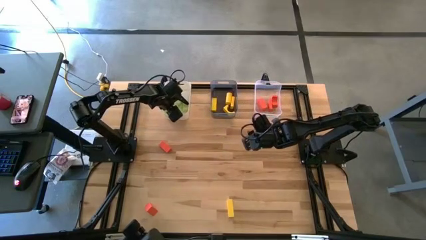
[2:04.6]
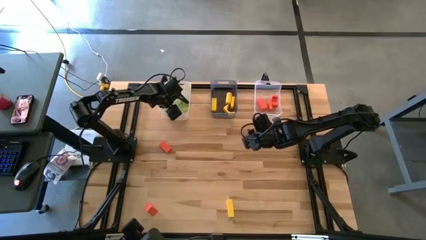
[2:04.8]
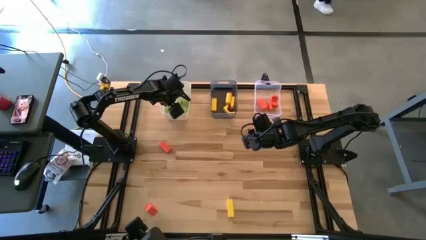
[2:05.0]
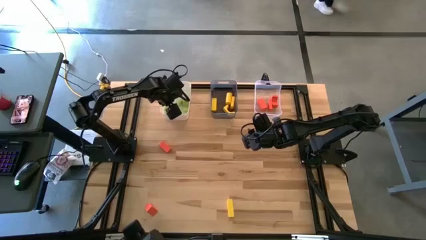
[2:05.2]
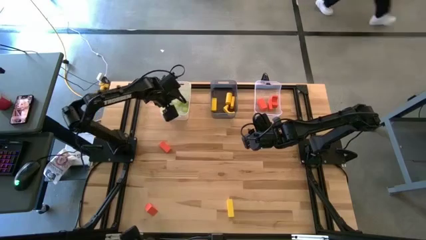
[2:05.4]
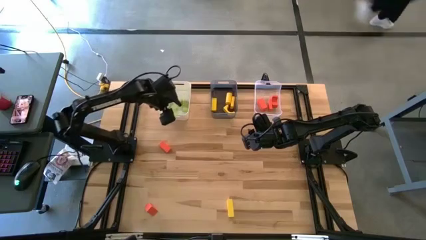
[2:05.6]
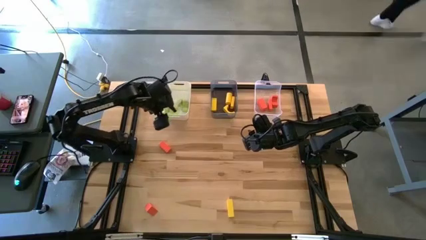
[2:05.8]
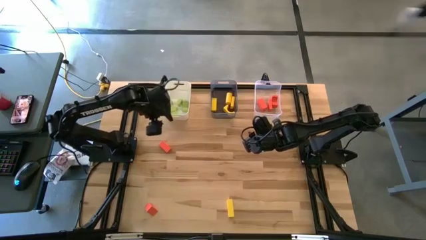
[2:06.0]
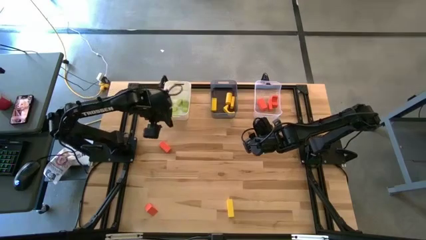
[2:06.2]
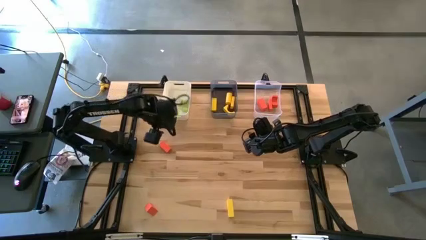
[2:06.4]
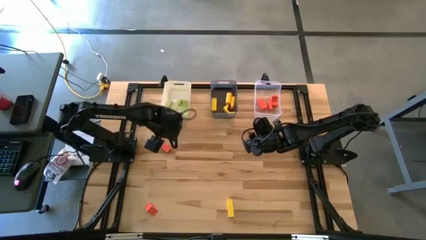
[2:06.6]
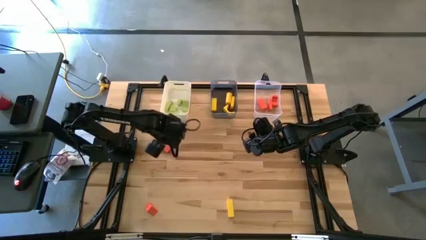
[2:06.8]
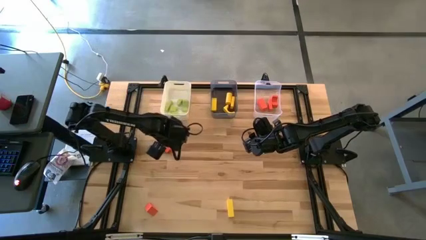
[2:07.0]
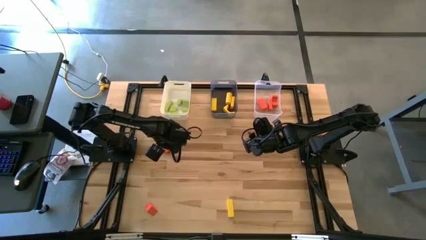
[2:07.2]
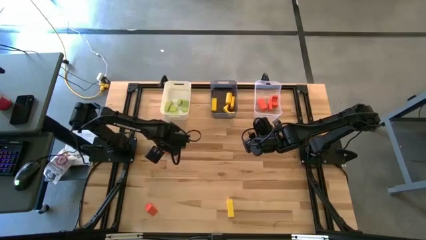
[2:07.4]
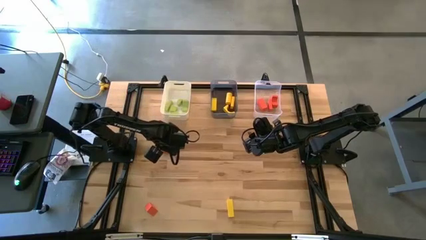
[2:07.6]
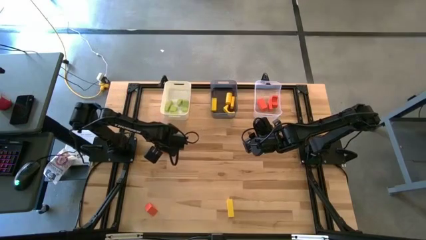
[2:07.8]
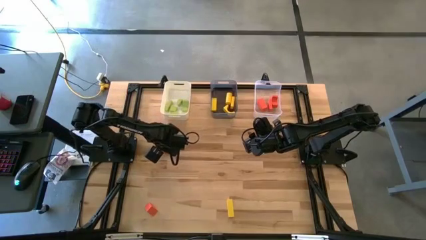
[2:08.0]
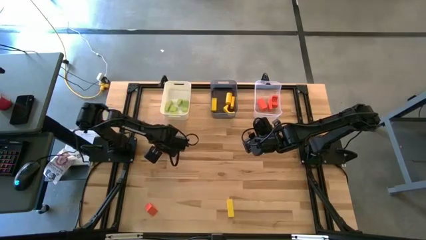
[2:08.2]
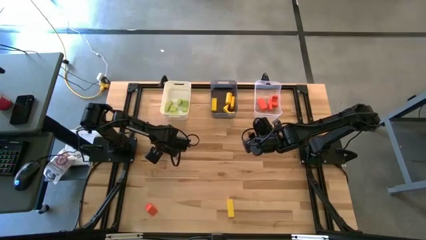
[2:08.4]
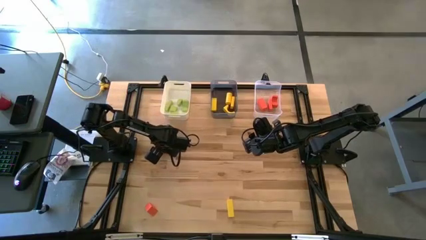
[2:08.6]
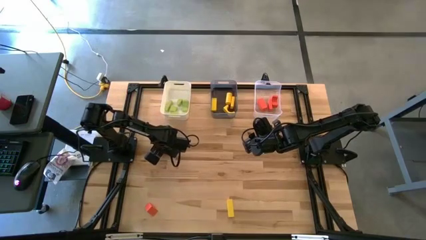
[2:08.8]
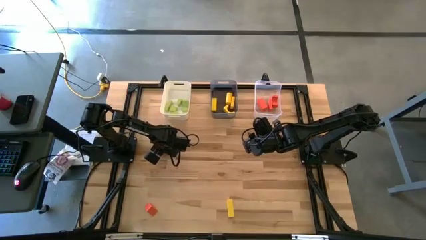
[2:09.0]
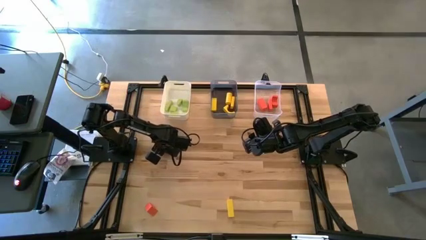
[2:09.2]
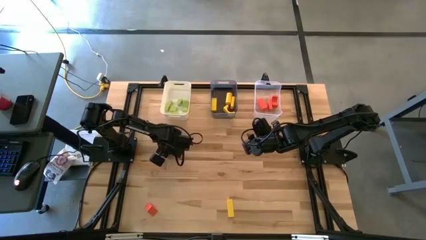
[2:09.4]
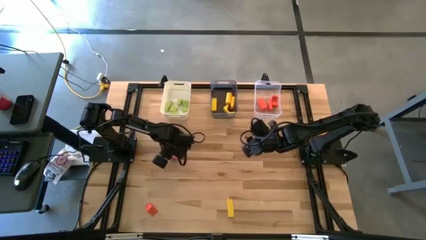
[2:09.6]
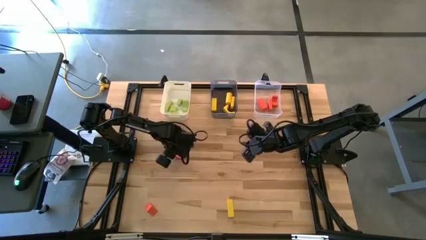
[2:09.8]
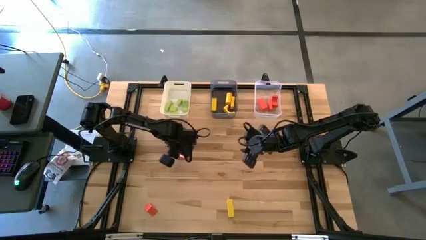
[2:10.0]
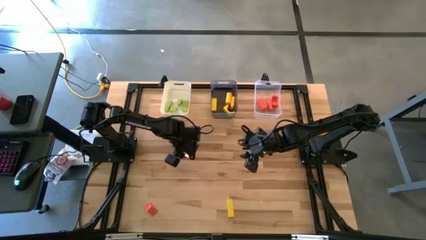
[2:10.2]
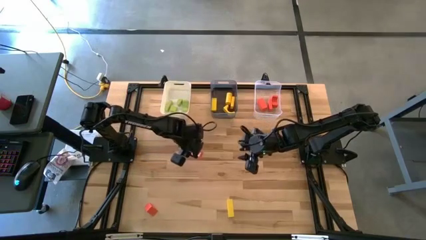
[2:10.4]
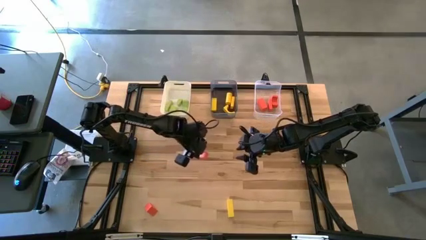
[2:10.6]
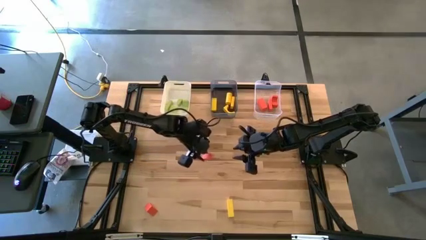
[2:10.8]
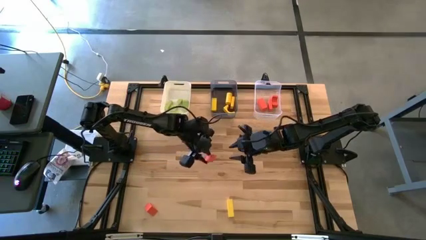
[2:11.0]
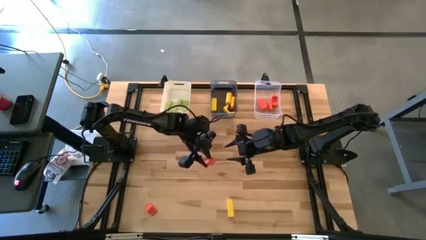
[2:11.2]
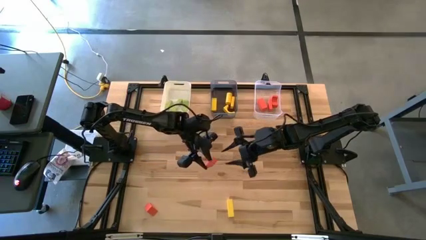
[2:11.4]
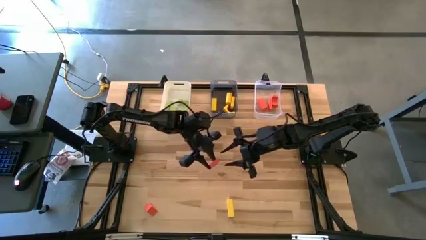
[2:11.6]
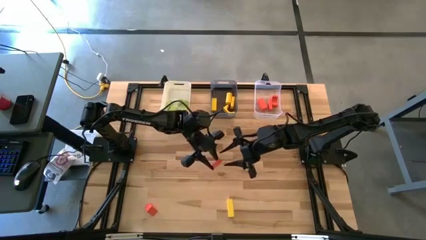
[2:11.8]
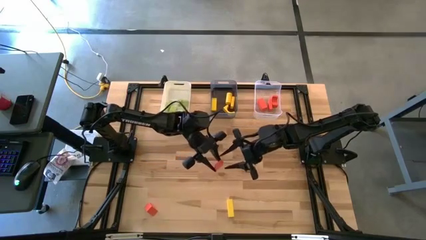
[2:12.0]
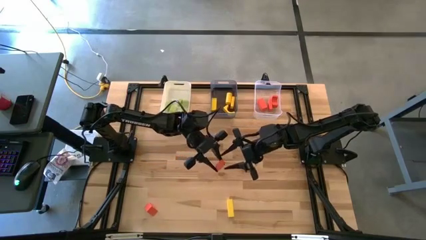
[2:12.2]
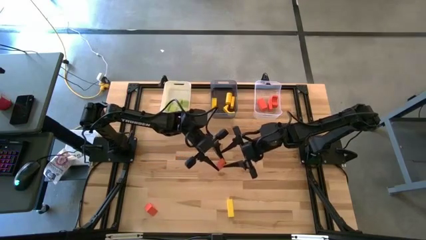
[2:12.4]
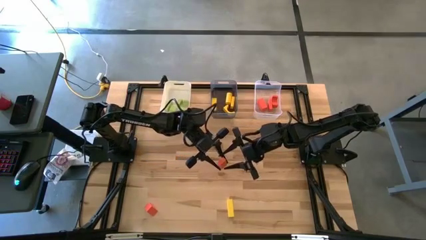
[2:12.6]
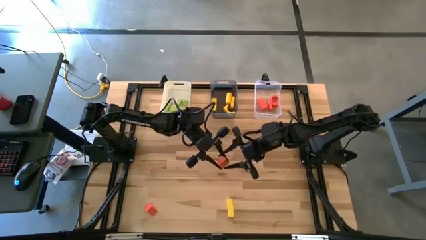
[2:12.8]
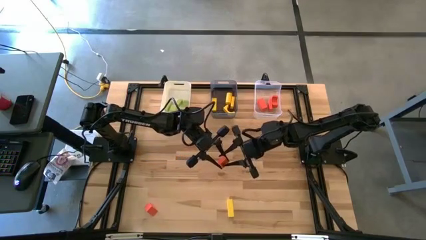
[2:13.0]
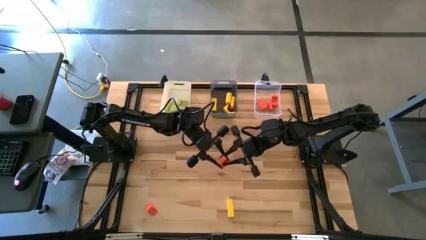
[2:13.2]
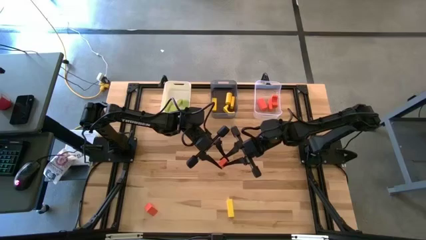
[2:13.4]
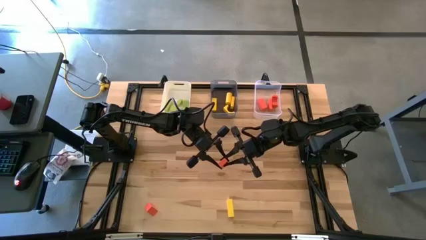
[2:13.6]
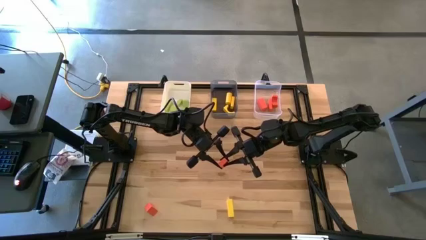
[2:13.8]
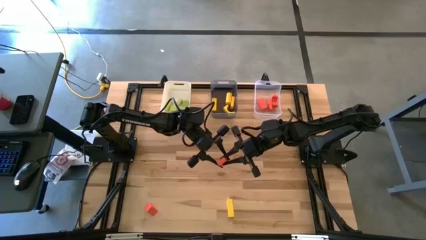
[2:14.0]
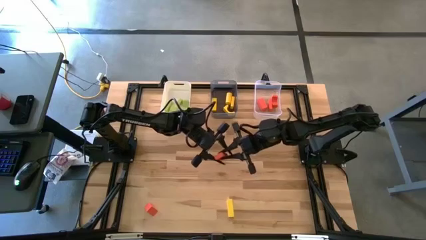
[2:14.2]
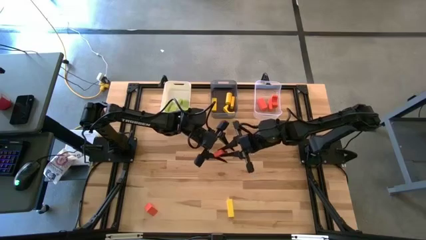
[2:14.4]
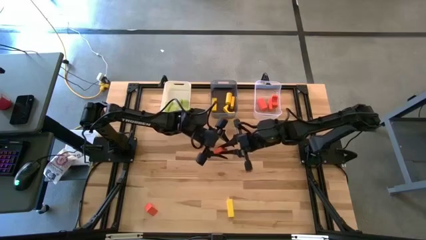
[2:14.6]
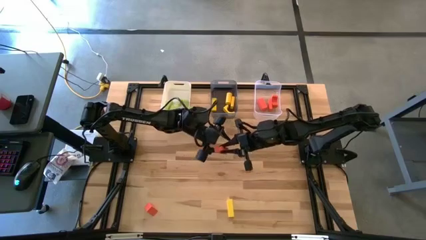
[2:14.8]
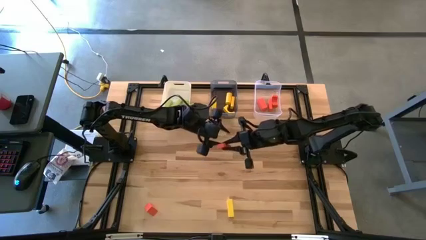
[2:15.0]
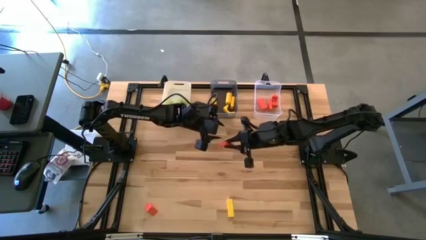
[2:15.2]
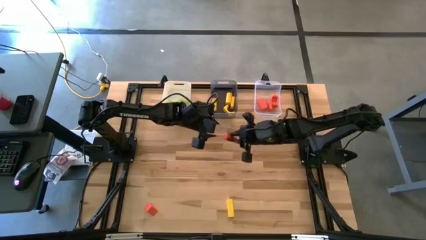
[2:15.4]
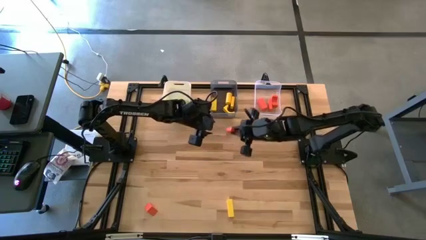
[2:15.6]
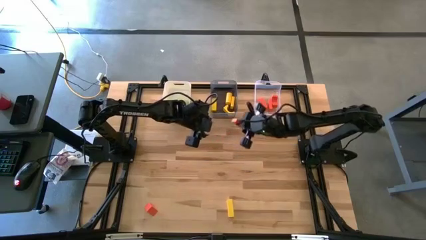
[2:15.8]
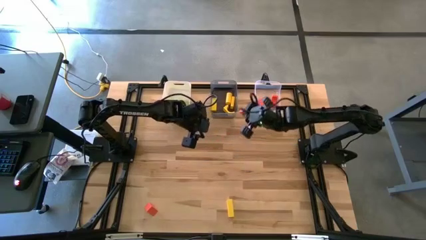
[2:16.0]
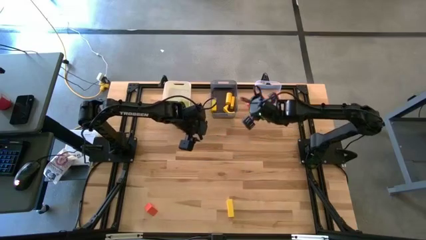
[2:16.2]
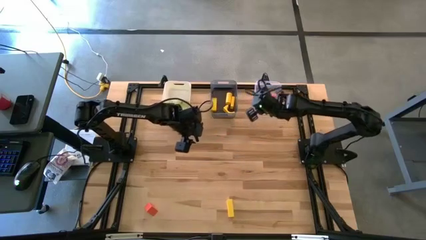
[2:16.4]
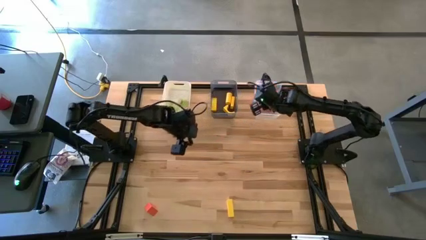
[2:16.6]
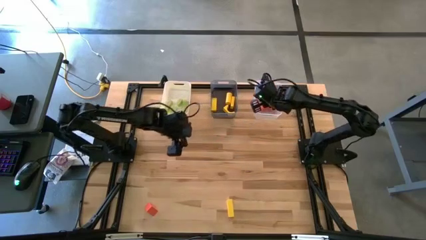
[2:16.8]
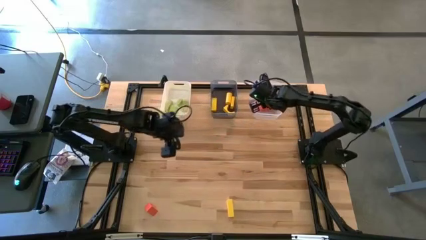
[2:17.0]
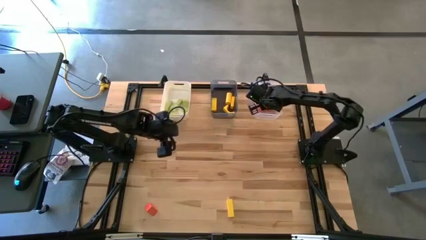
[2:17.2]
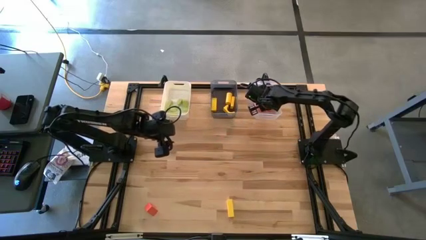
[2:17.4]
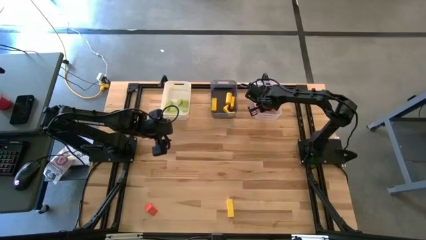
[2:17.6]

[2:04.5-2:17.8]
Task: Sort & place blocks by color
Put the orange block into the transparent bin

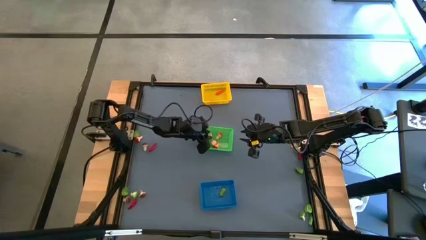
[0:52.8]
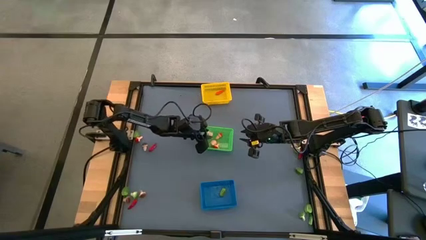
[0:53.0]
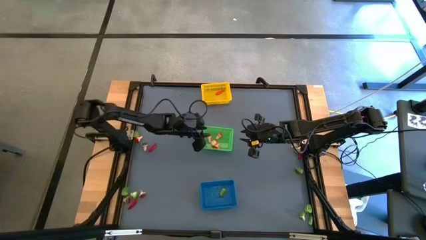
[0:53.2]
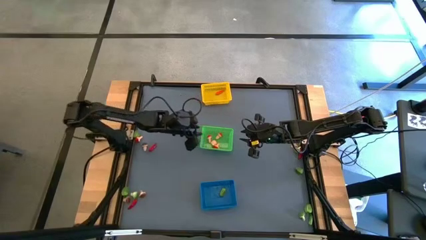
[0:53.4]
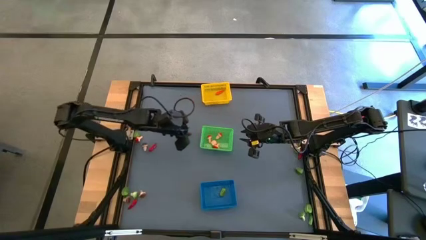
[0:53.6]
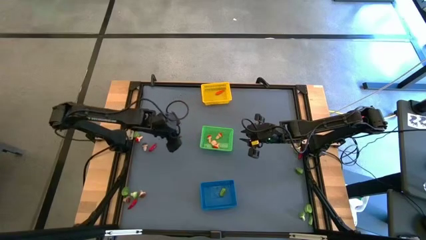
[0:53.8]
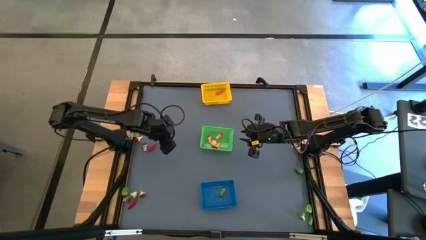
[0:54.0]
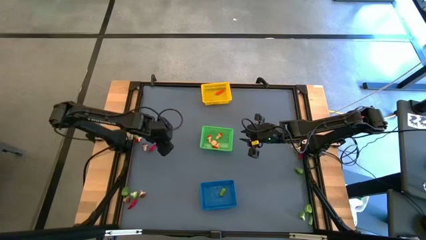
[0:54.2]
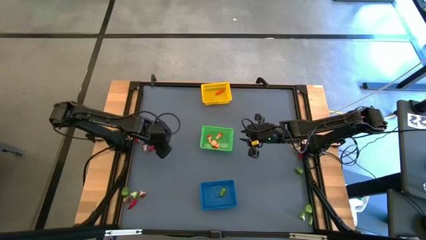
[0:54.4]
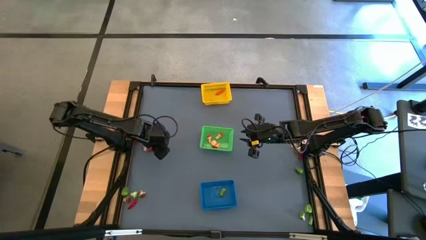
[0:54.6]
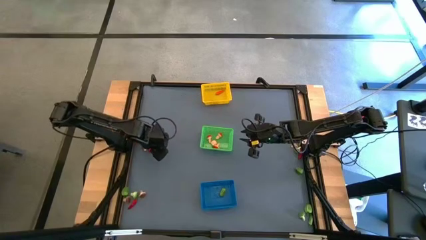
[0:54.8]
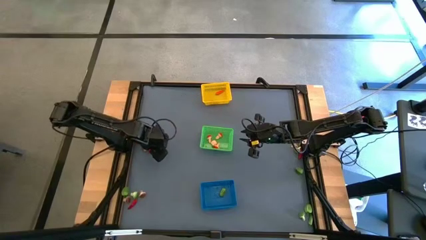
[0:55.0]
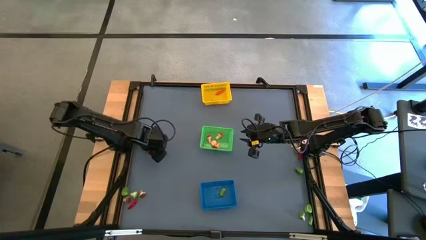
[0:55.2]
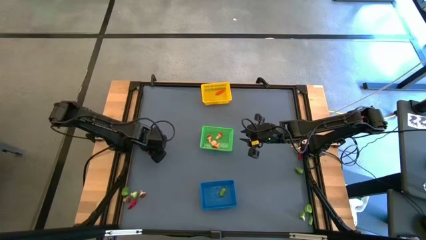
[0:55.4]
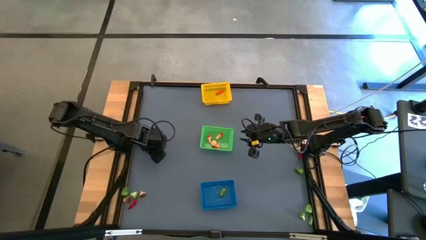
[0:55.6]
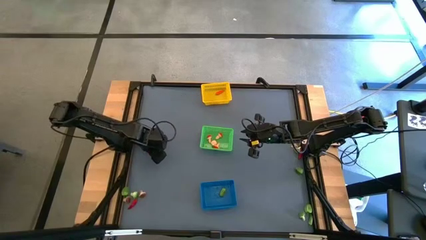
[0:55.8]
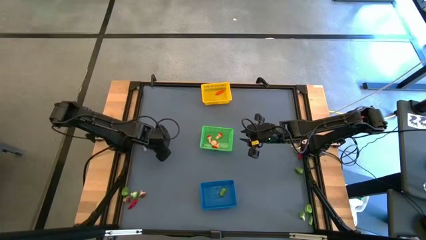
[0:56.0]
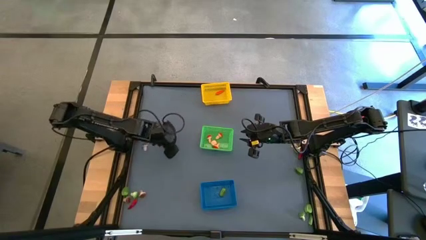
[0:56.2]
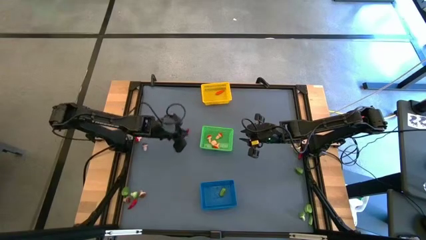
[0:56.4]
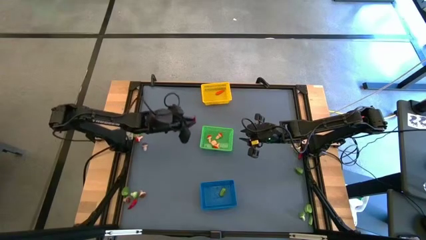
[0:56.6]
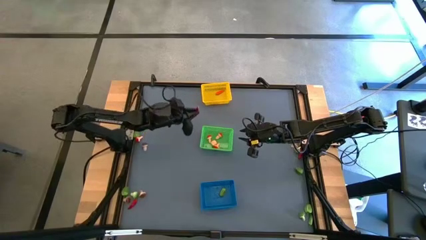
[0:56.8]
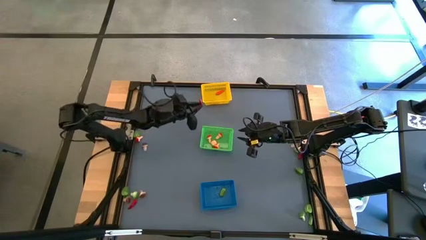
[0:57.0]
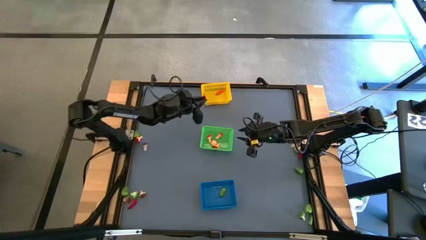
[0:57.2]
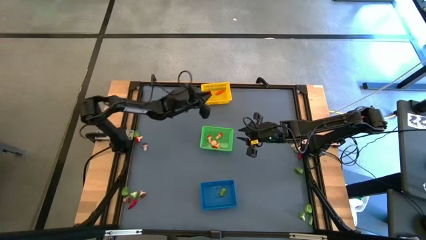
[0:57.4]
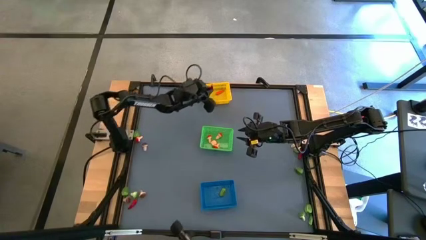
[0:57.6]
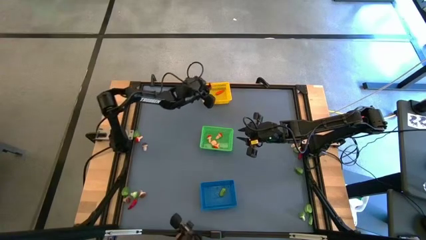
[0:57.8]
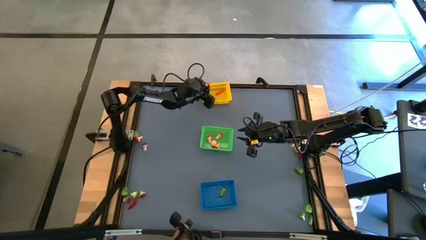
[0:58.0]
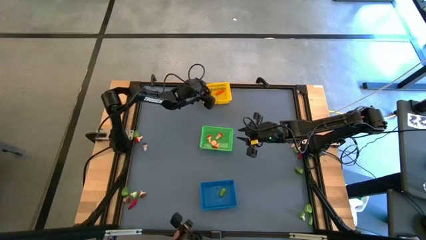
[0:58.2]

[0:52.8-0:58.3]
Task: Sort produce into baskets
Put the red chili pepper into the yellow bin
